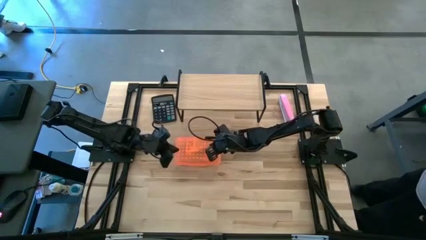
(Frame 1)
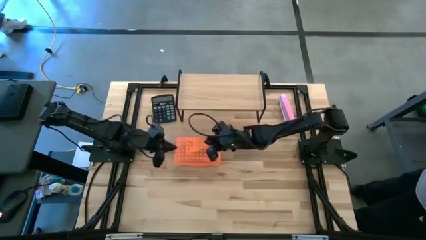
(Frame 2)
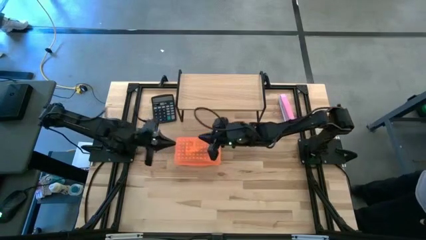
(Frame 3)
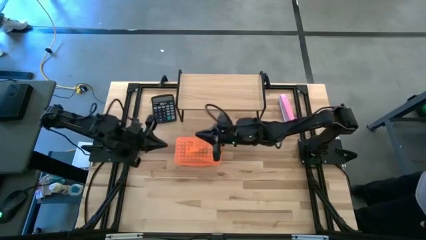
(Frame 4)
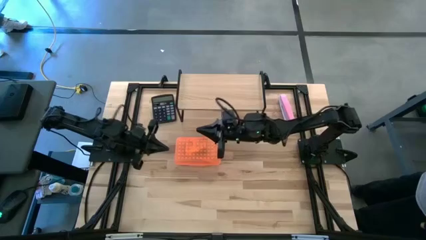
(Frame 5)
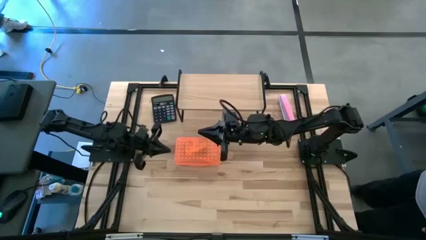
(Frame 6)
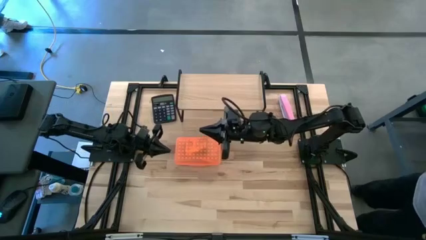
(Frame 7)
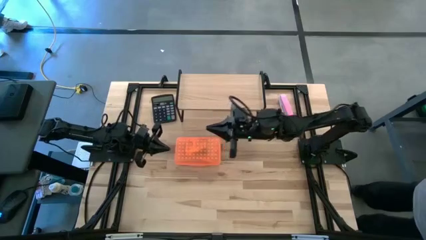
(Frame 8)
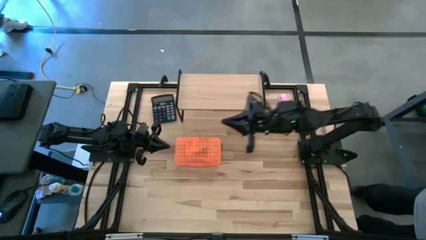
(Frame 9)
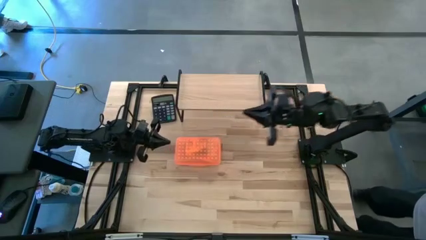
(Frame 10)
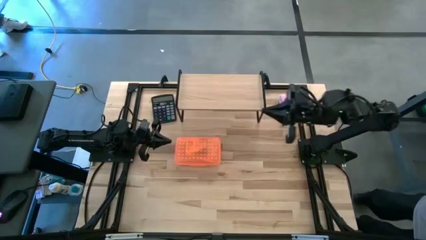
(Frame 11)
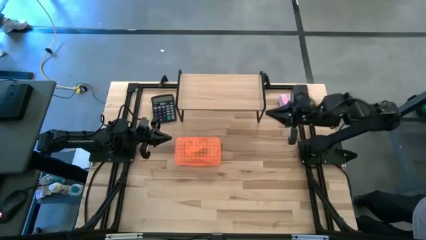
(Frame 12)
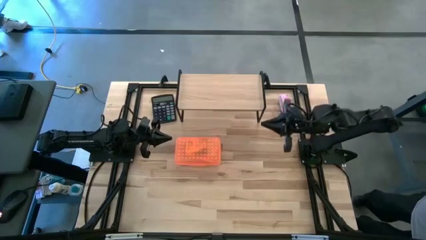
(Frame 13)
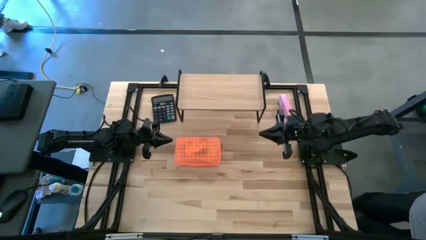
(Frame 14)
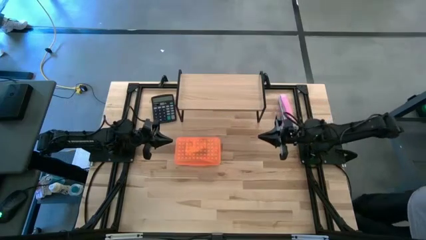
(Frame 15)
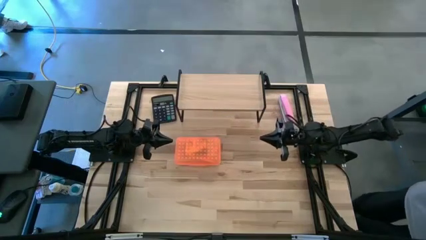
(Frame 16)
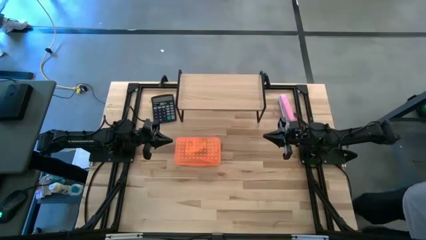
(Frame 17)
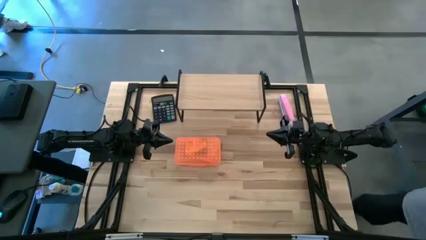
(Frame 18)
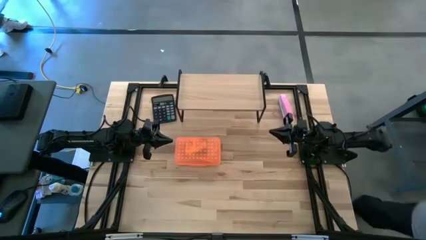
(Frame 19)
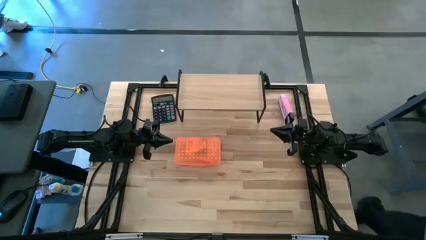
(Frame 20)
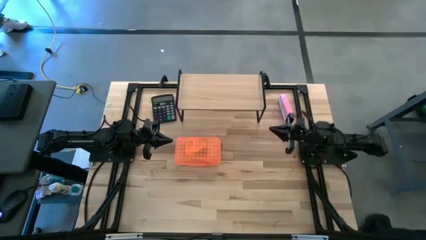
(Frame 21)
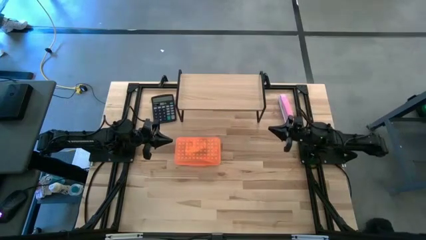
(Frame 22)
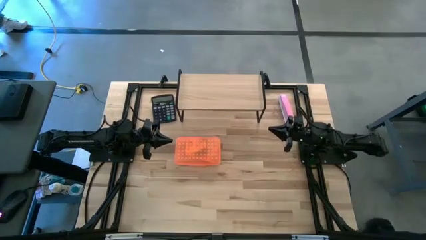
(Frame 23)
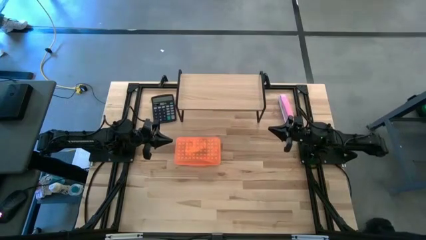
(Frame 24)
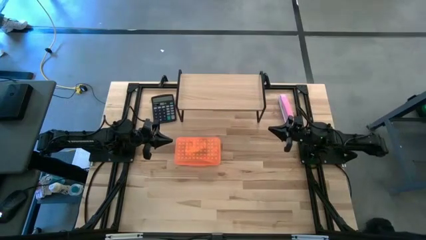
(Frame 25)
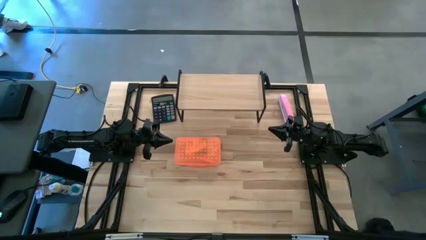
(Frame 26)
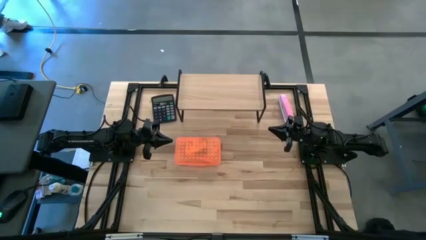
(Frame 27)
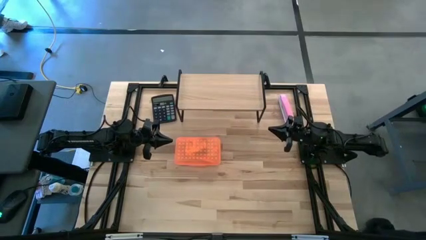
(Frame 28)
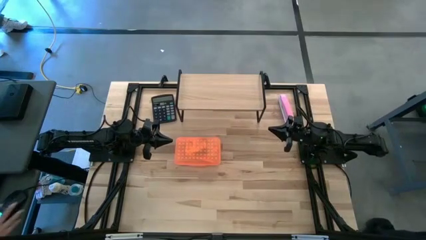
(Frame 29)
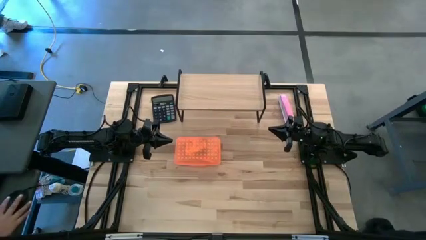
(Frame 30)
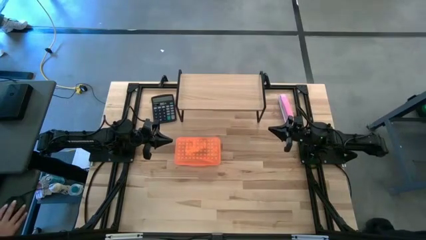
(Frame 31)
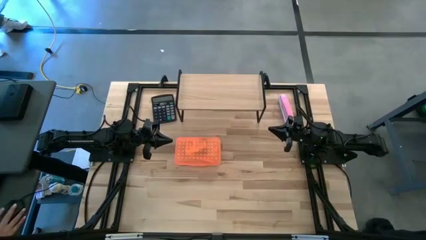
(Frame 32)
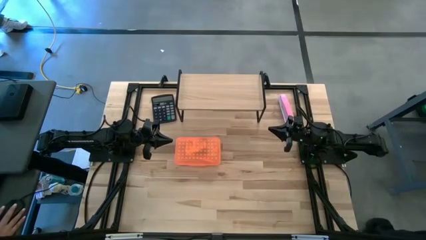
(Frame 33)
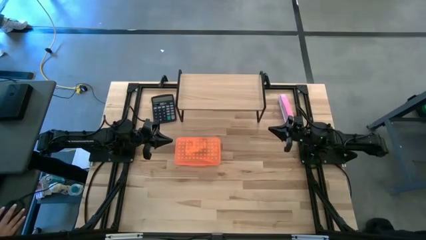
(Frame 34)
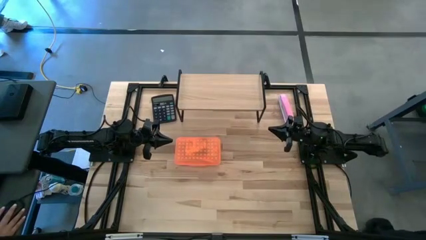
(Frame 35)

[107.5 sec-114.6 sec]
Task: Pack school essentials
Return to Home Position

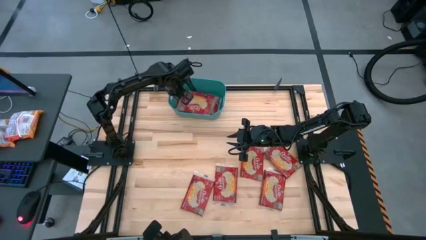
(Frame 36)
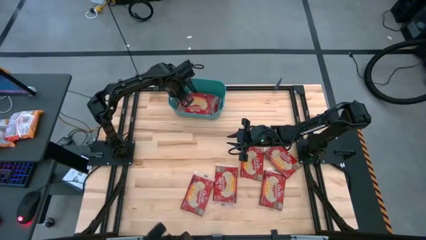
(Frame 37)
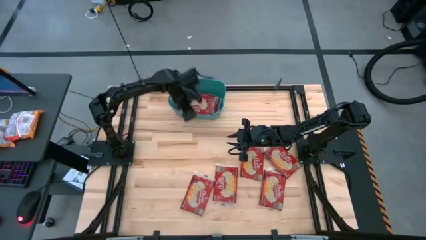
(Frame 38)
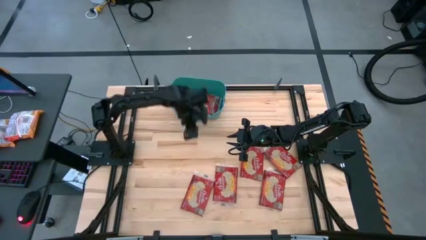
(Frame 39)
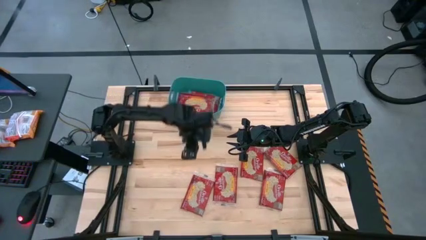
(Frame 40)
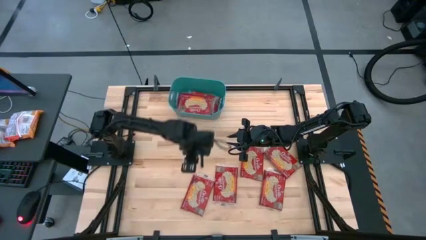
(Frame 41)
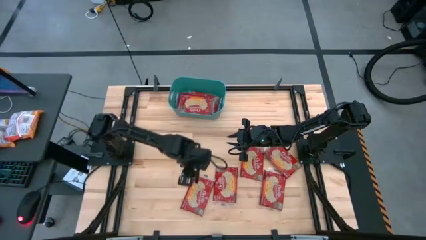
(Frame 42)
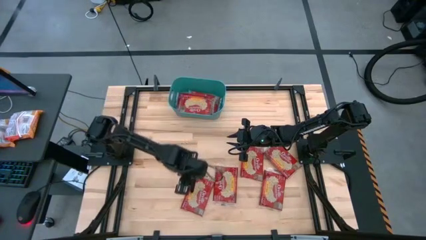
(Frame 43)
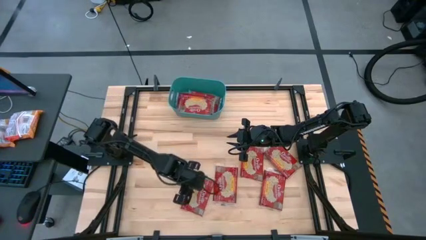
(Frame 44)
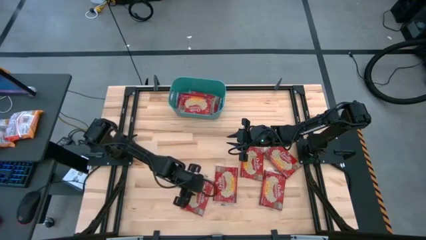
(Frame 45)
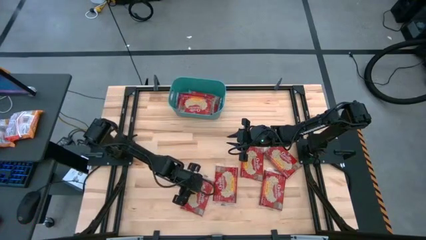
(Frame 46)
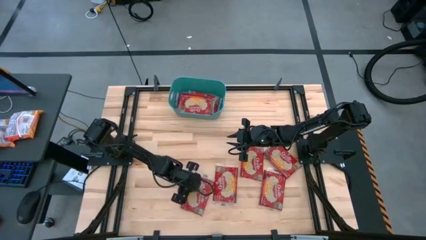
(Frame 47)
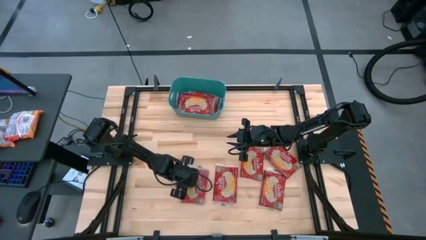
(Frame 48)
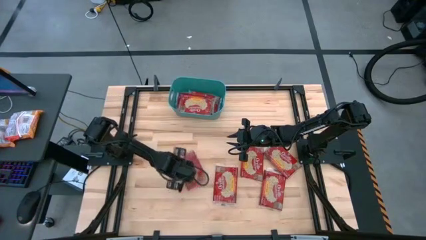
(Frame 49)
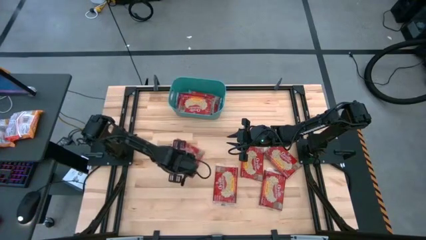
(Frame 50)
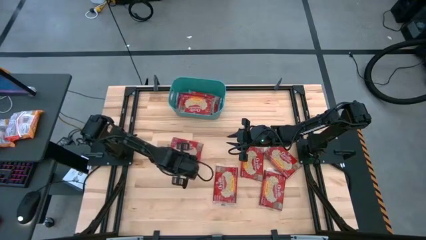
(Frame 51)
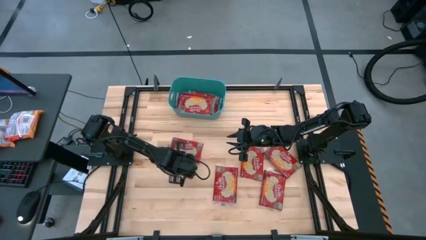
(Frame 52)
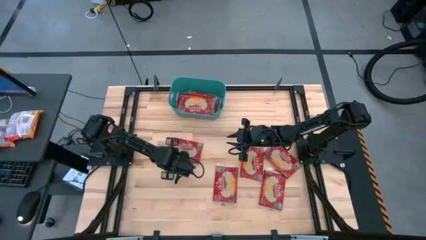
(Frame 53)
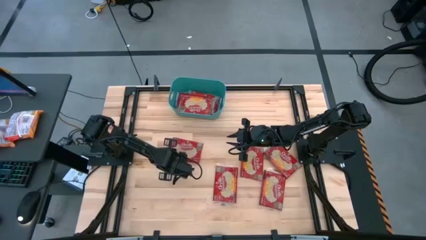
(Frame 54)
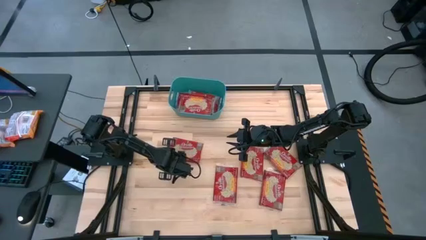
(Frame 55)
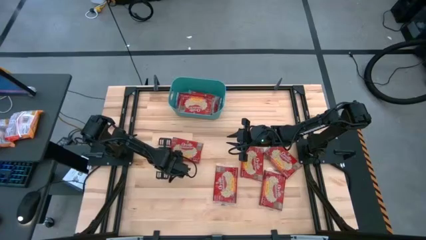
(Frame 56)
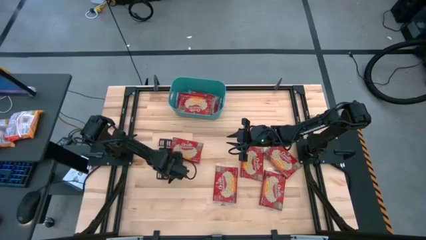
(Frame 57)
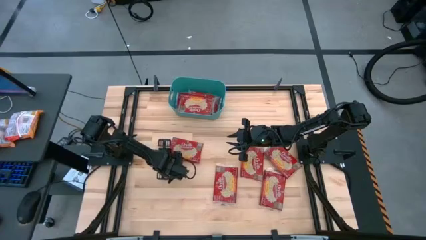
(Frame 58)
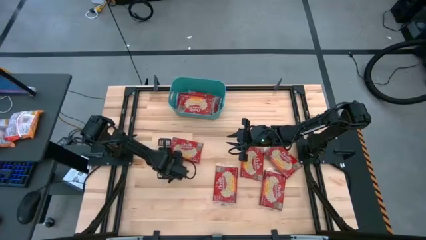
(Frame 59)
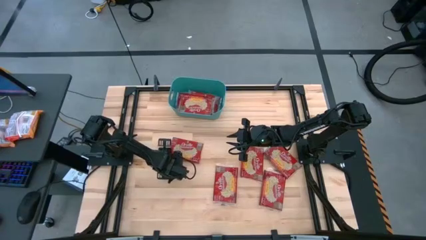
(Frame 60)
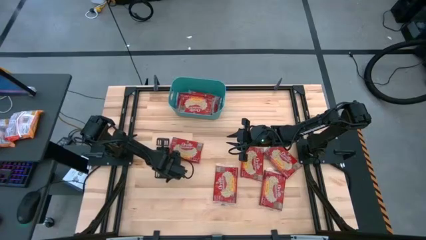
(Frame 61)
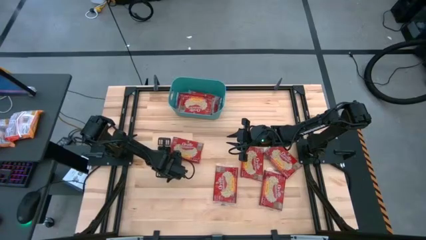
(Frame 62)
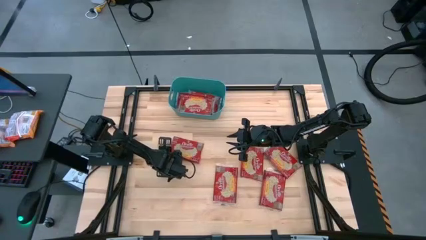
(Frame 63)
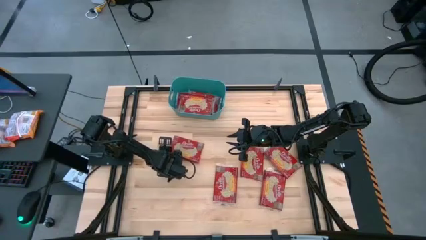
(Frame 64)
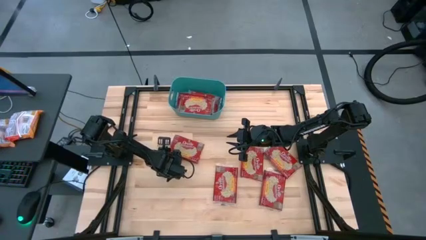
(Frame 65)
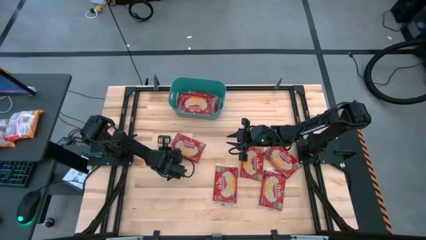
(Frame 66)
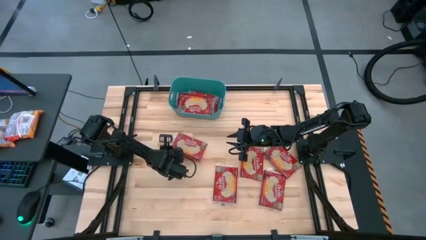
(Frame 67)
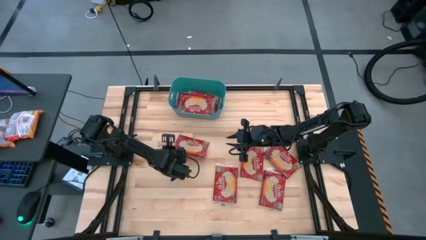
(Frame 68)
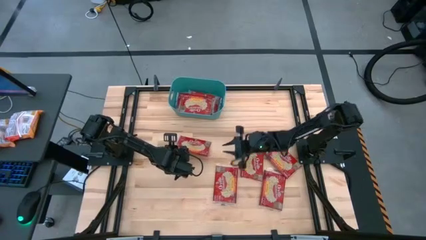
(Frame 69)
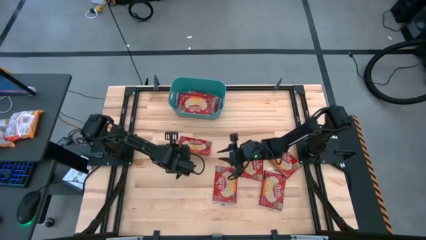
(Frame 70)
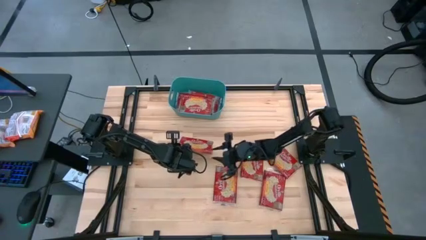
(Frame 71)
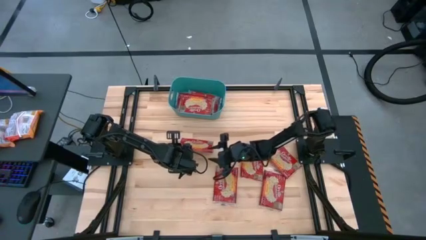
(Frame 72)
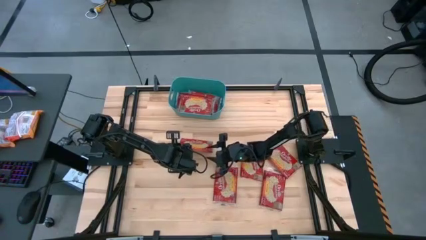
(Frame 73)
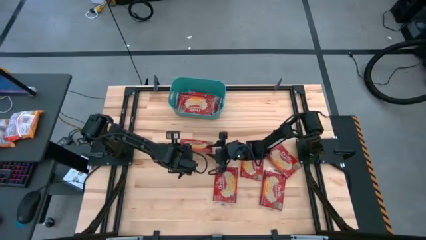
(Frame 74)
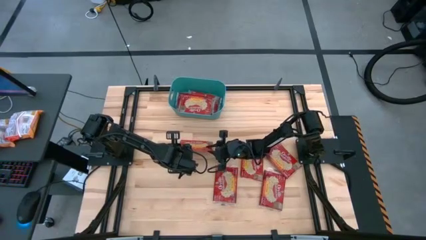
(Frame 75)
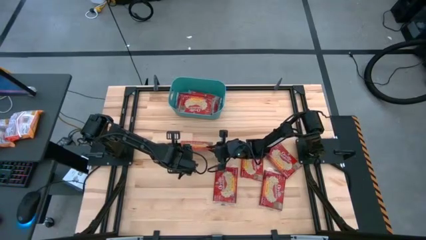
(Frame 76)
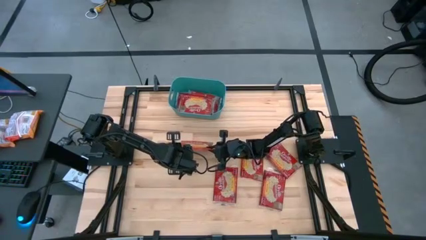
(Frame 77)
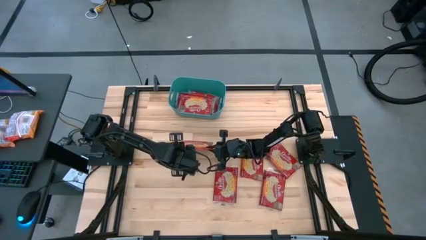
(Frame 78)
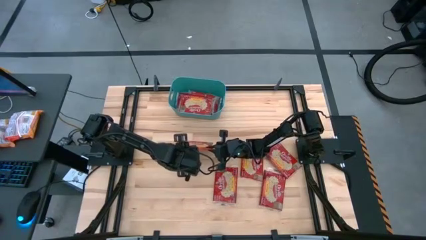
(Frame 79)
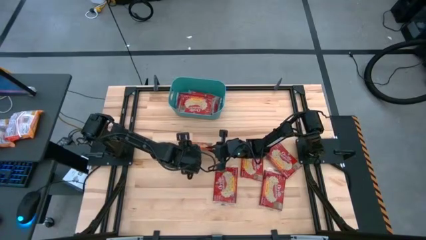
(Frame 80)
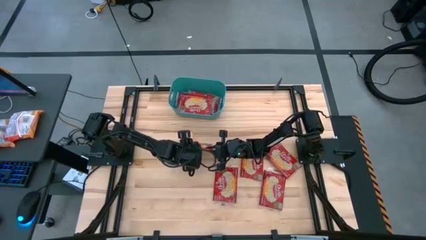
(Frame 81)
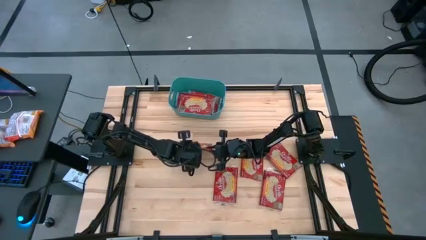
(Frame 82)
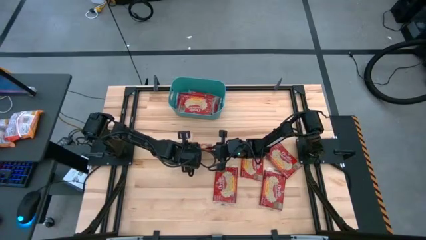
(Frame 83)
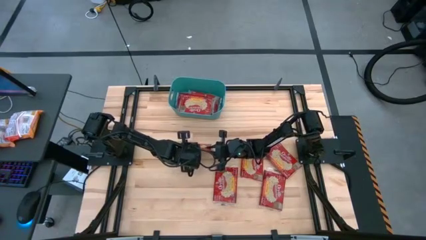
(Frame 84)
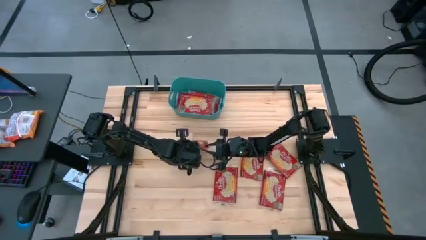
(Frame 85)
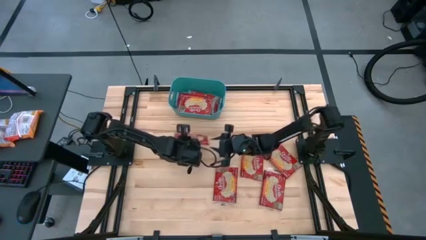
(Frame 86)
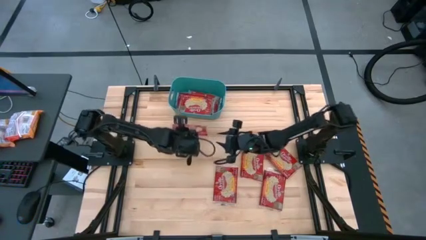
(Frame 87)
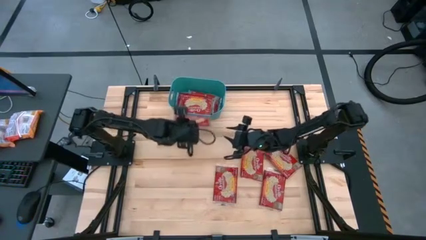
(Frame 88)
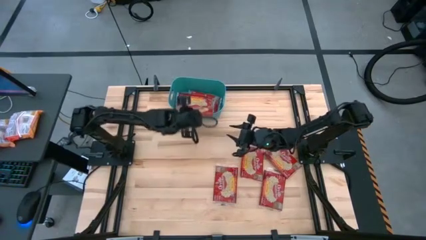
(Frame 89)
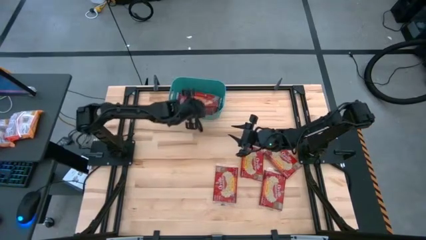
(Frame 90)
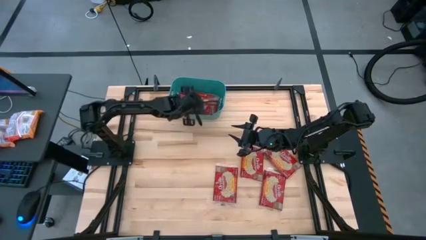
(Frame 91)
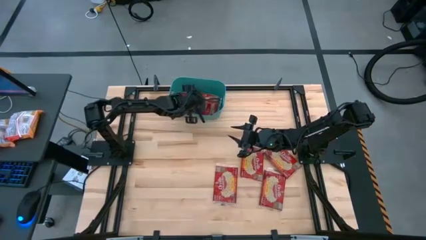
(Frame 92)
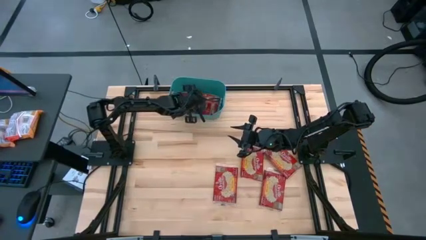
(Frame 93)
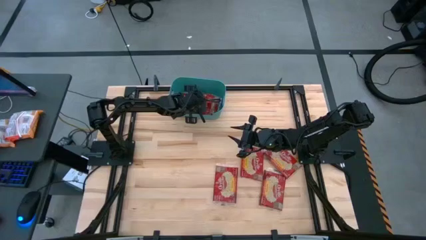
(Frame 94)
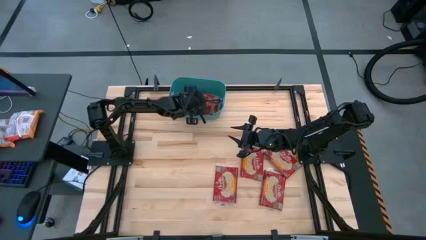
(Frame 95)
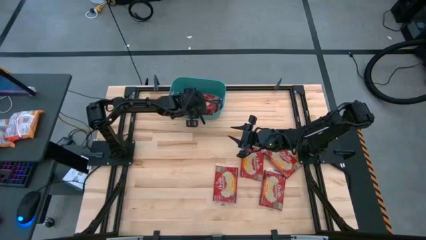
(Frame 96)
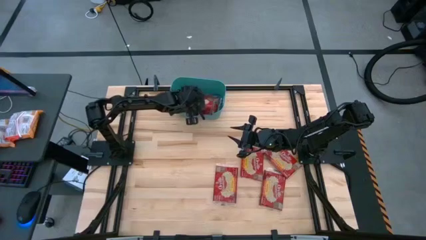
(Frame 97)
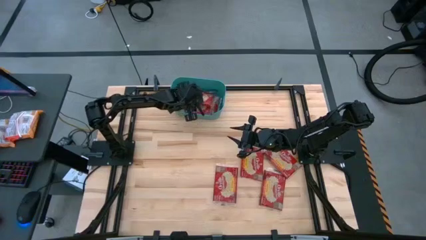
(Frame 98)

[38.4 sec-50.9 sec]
Task: Sort popcorn bags into baskets
Put the red popcorn bag into the green bin
